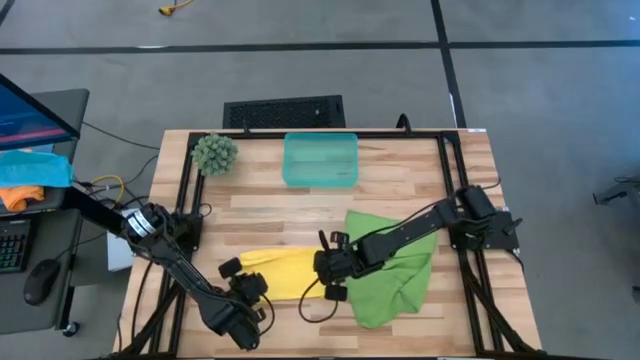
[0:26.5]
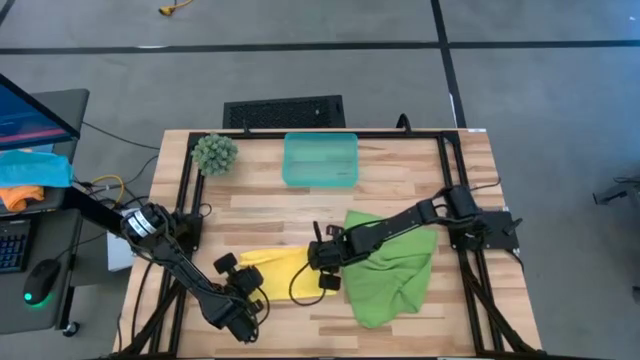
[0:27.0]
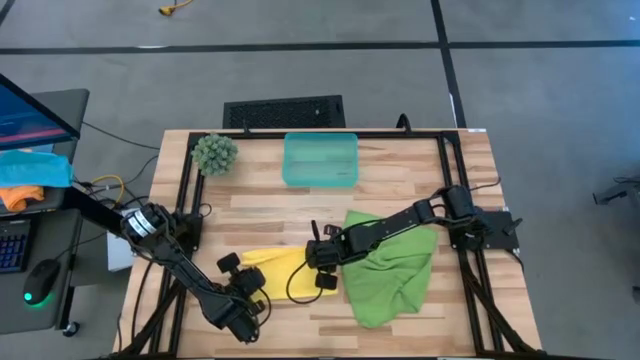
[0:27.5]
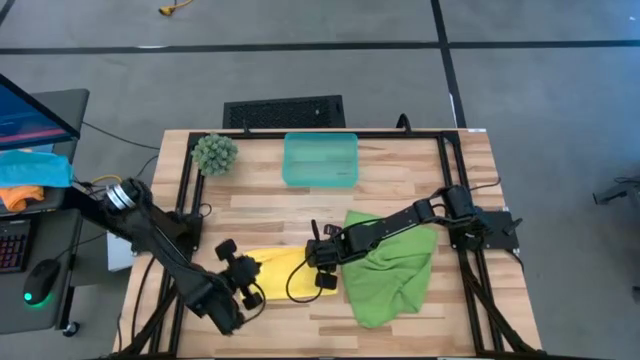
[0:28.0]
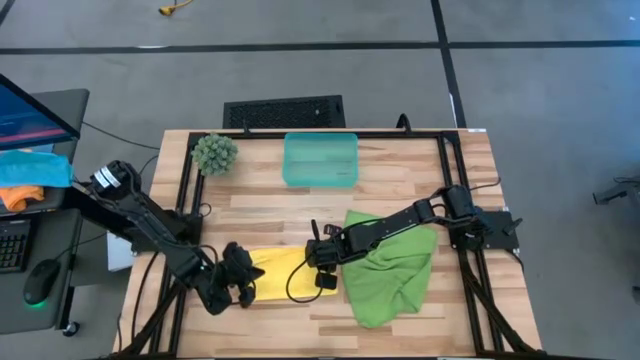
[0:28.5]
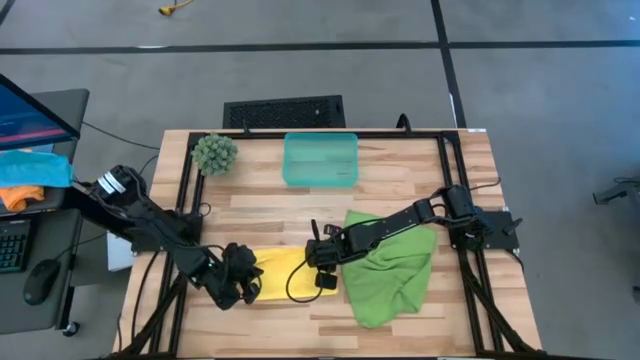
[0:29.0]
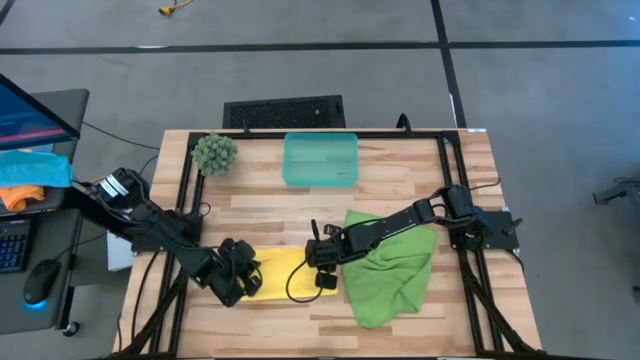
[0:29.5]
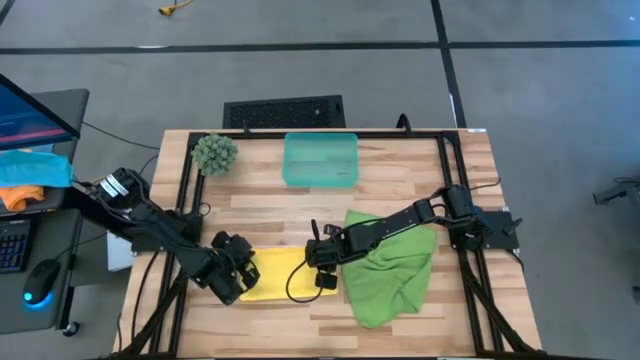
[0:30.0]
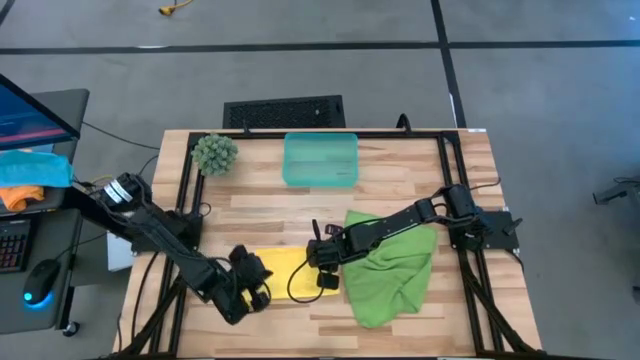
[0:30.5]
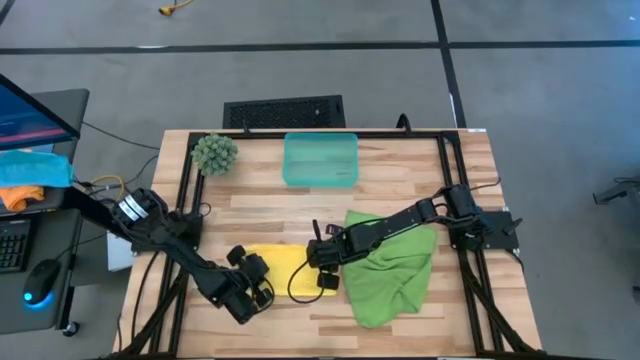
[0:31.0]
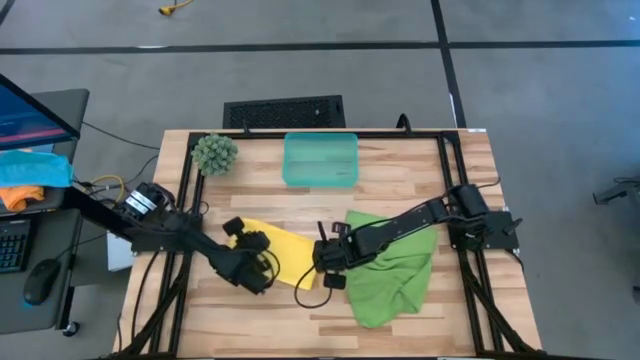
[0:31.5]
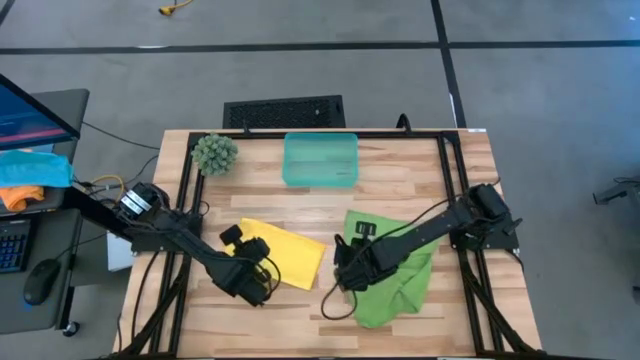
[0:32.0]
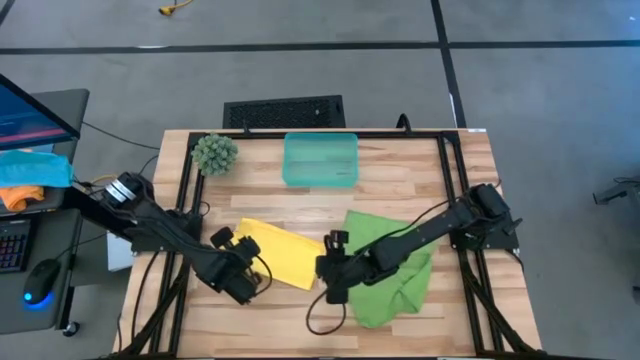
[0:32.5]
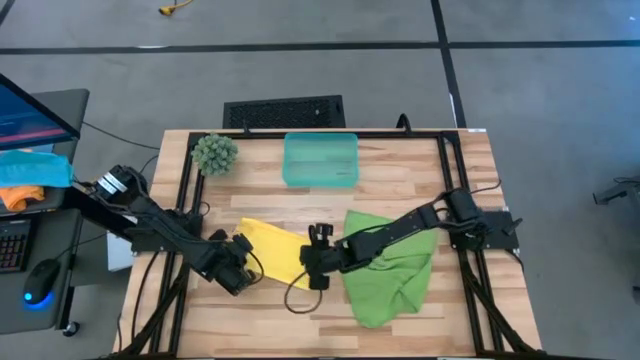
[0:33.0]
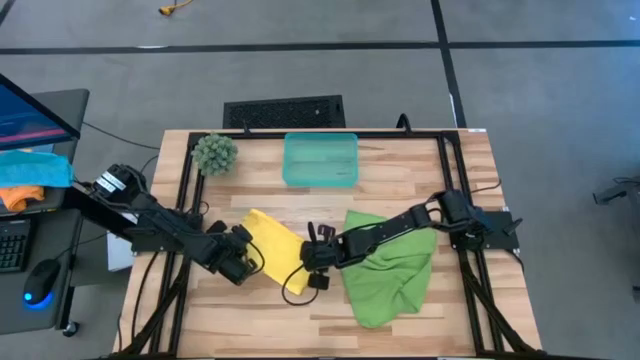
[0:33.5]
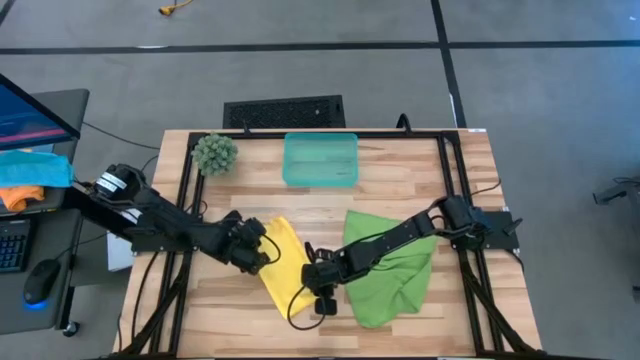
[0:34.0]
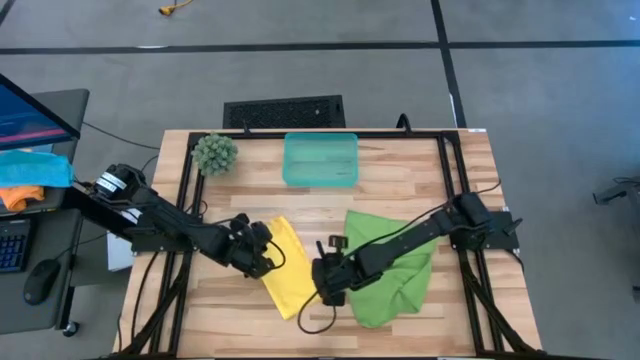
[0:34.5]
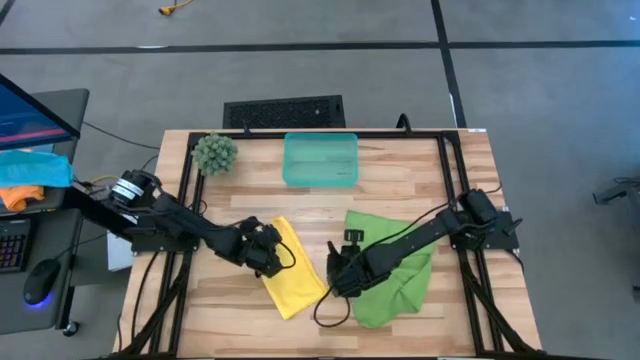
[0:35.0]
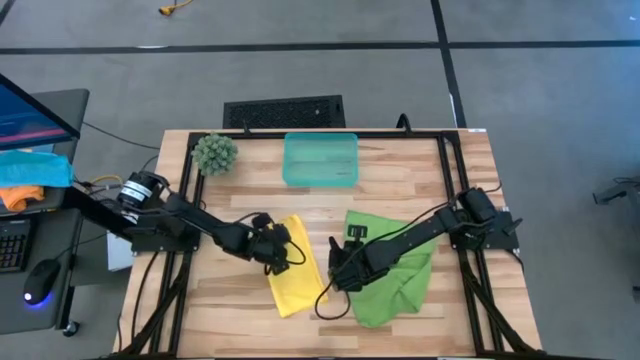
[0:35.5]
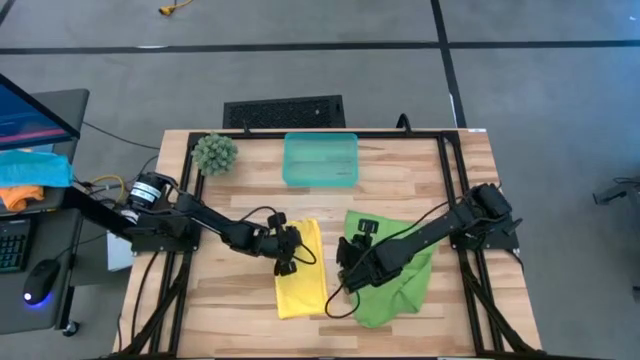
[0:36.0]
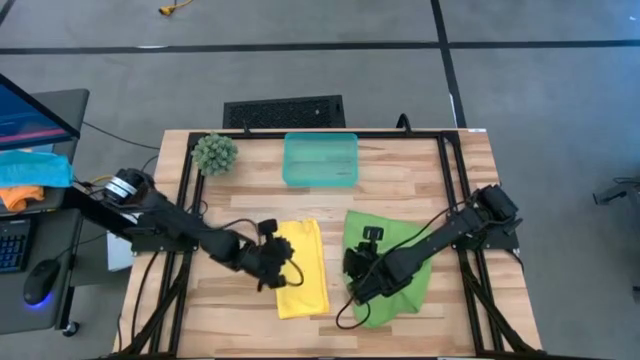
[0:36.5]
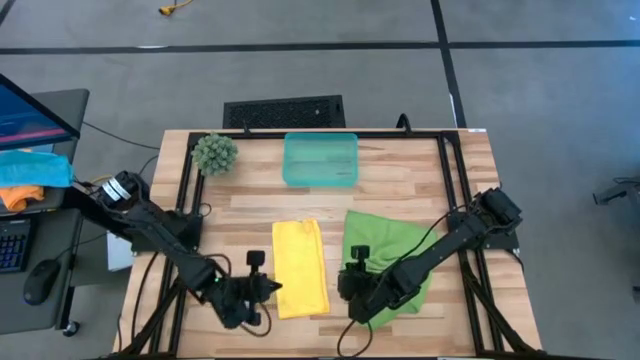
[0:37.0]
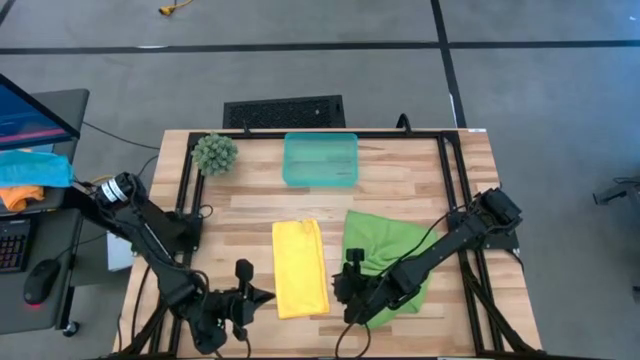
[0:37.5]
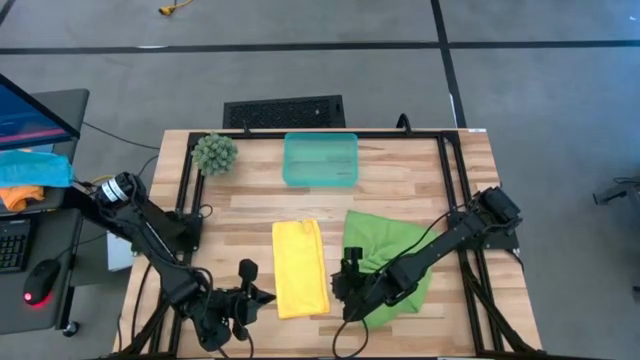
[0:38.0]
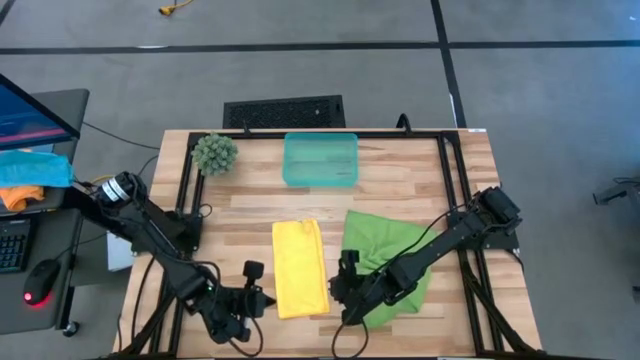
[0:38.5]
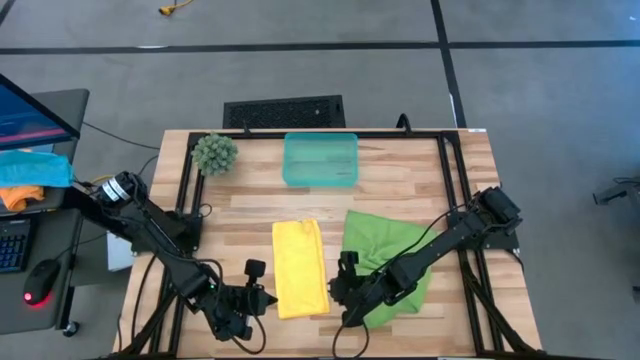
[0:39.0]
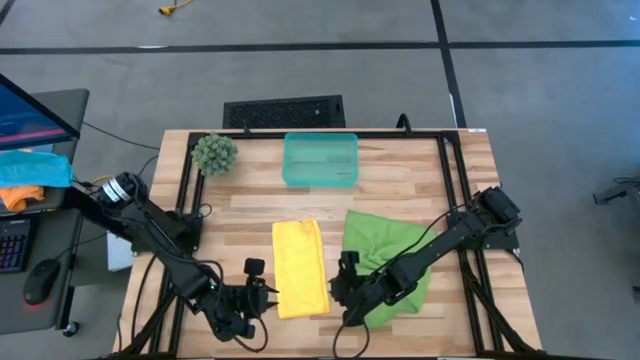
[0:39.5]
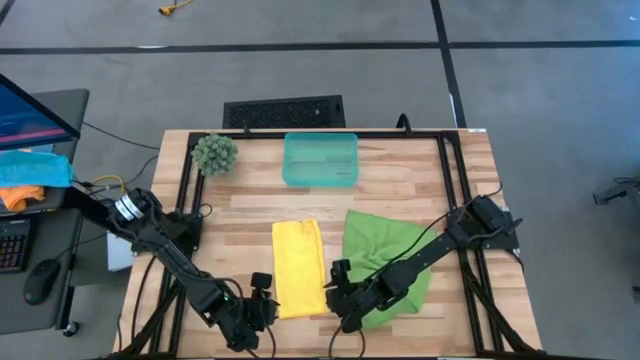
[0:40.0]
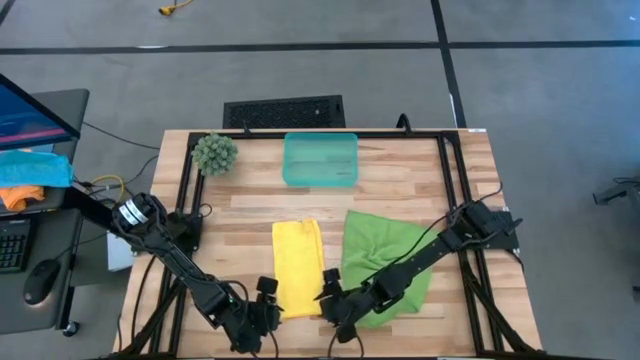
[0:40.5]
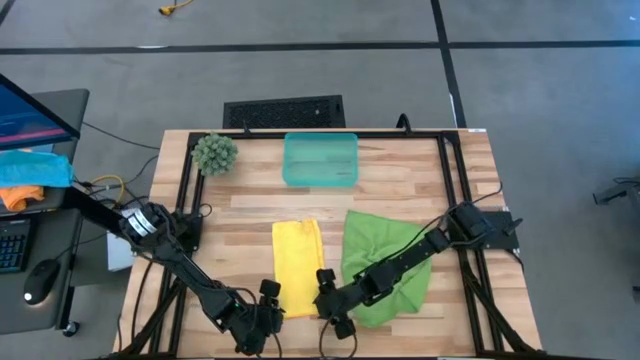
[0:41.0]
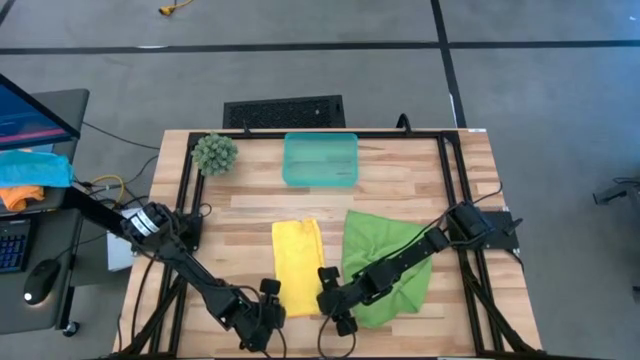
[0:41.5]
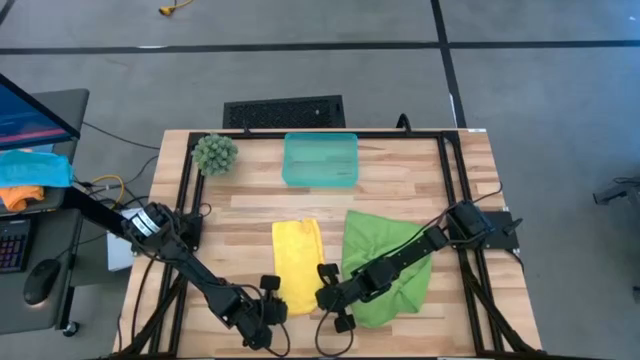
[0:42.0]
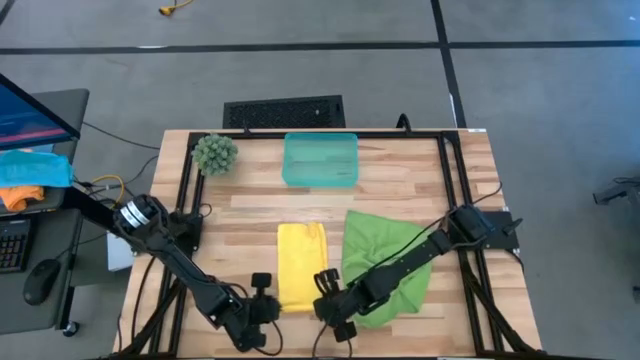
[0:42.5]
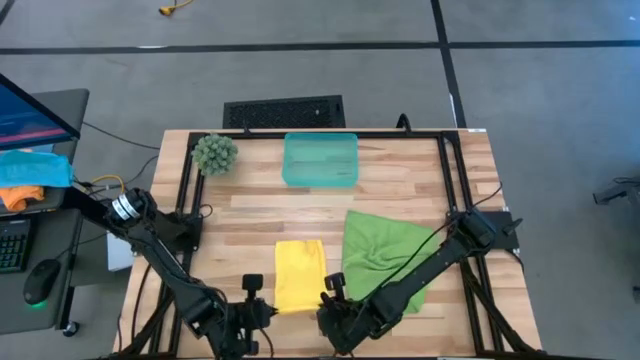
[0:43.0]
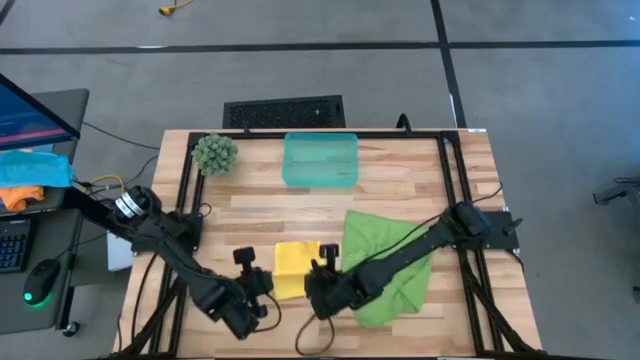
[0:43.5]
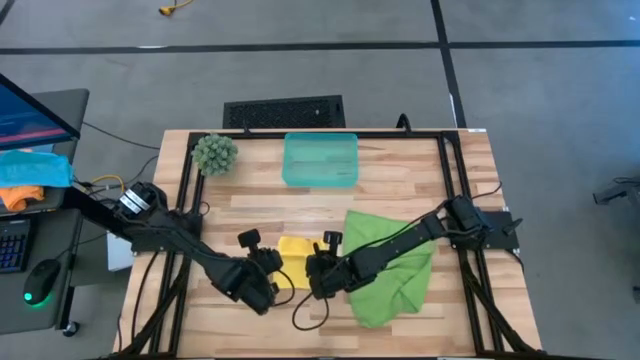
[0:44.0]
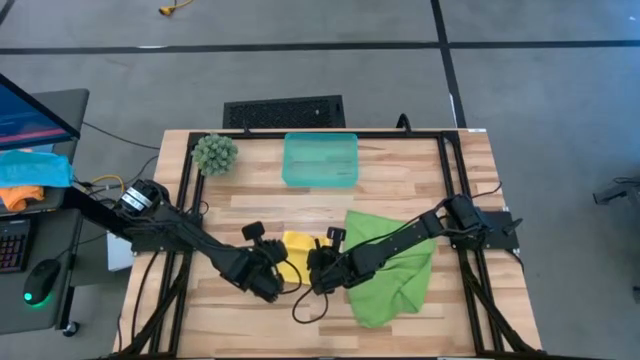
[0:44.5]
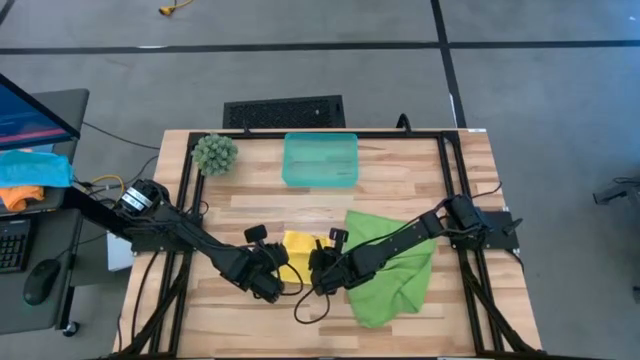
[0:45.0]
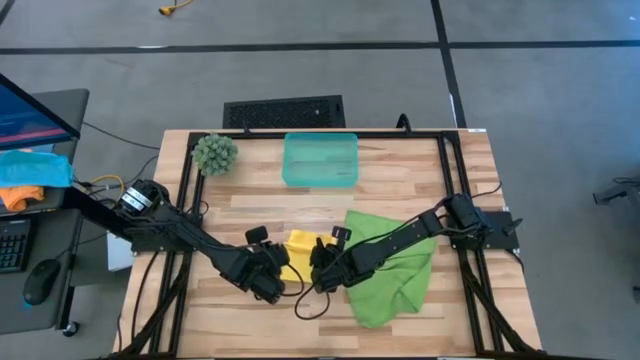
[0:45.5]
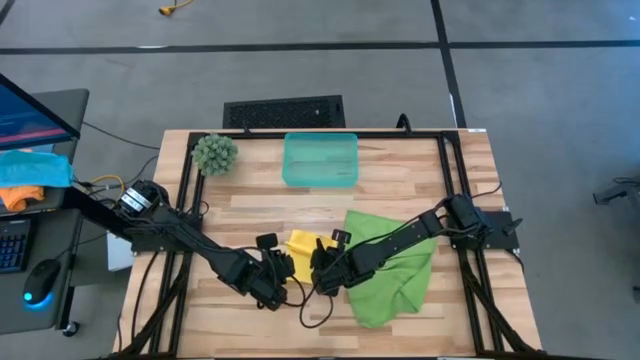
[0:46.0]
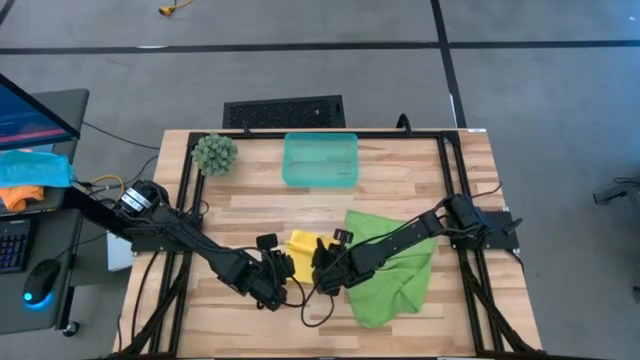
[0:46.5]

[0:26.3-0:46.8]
Task: Roll microfiber towels into tight, uniform cylinder then place into a basket
Fold the yellow microfiber cloth
